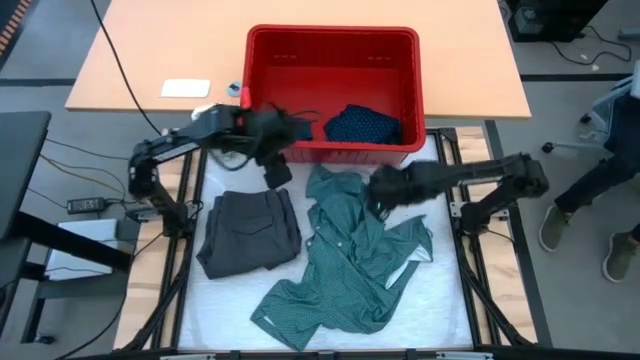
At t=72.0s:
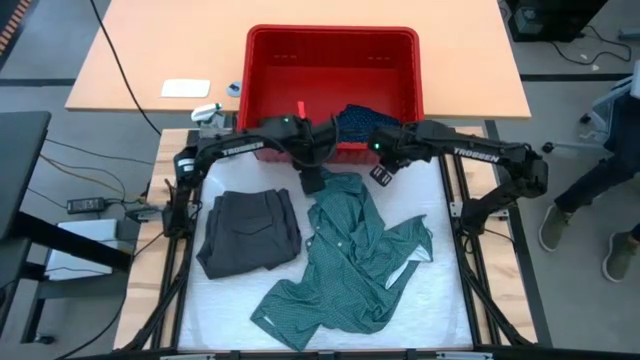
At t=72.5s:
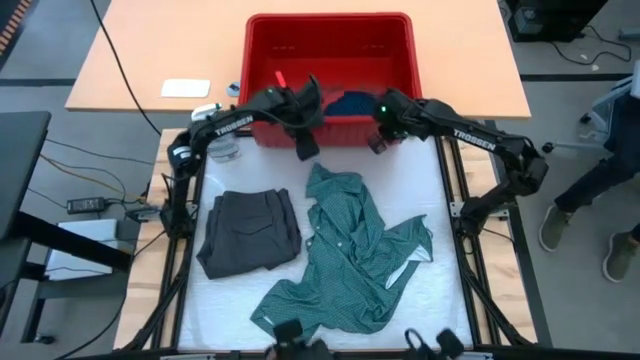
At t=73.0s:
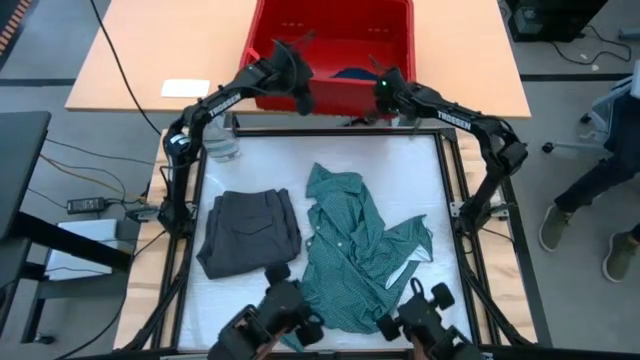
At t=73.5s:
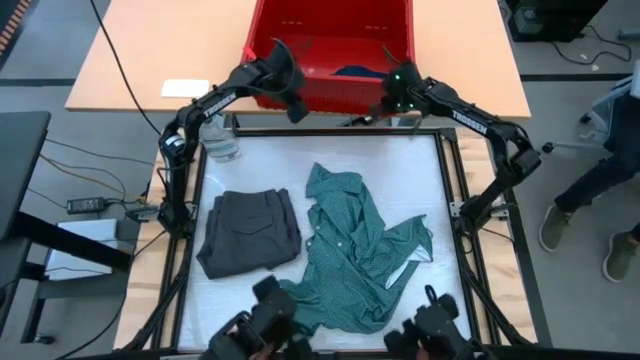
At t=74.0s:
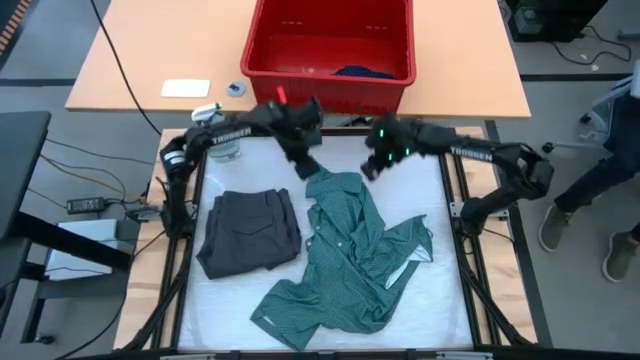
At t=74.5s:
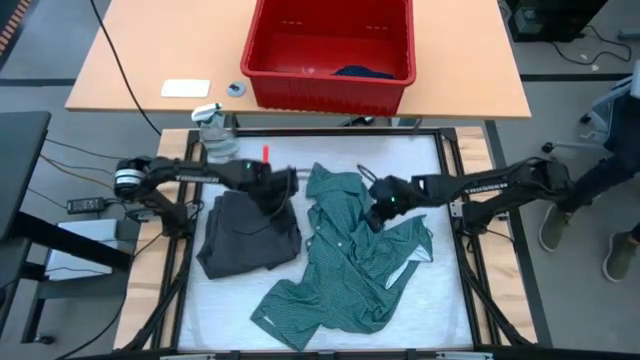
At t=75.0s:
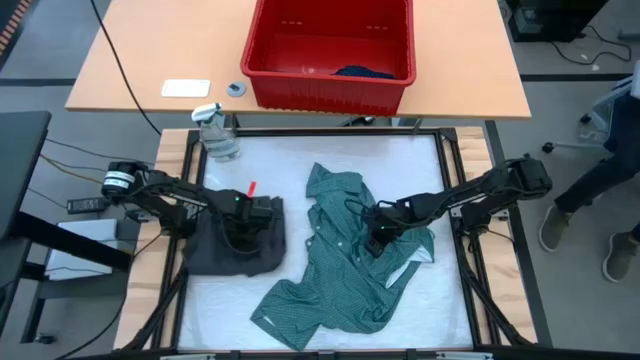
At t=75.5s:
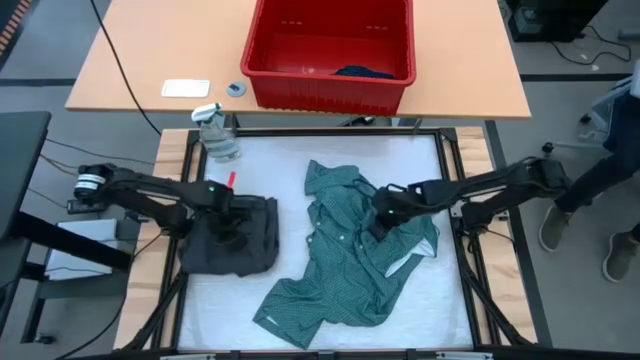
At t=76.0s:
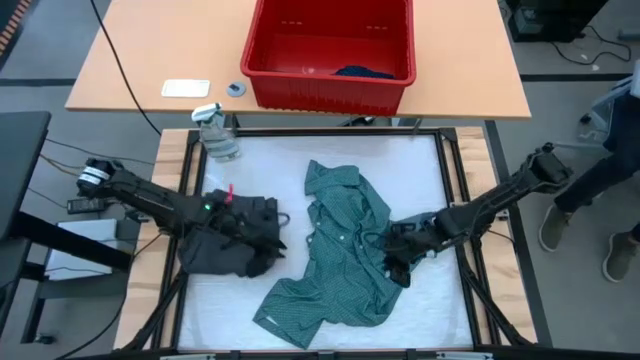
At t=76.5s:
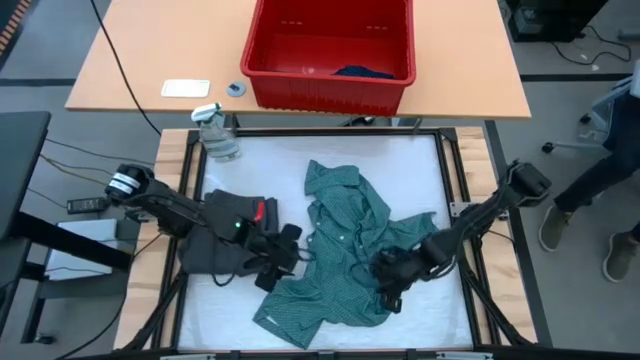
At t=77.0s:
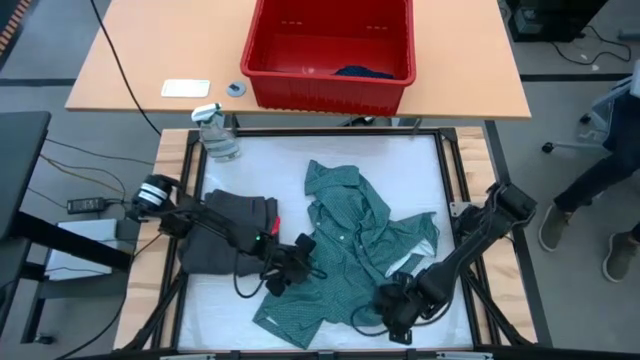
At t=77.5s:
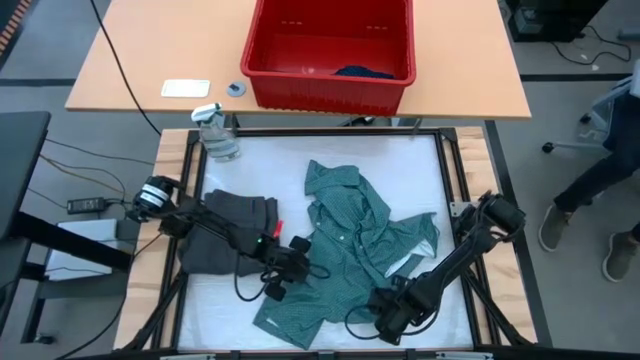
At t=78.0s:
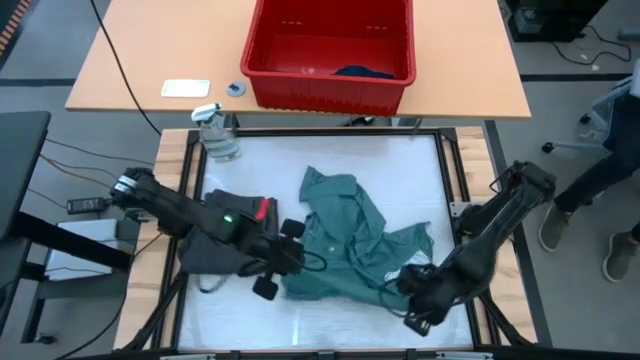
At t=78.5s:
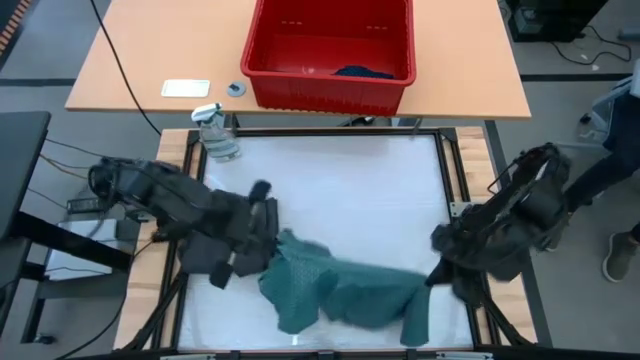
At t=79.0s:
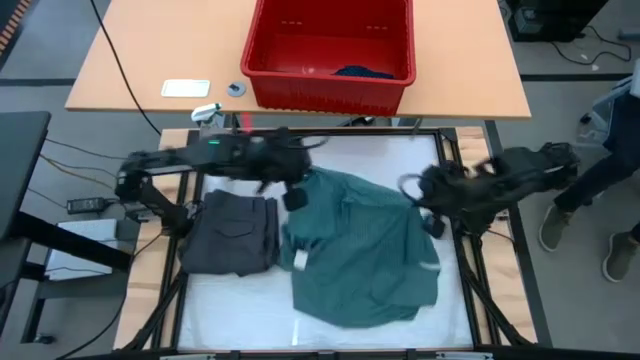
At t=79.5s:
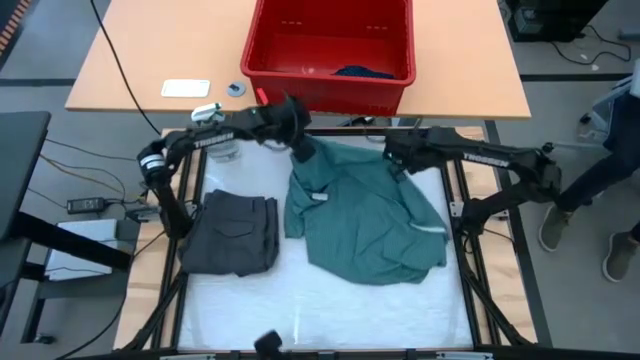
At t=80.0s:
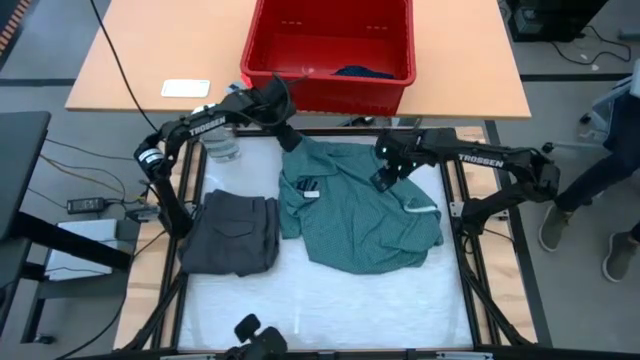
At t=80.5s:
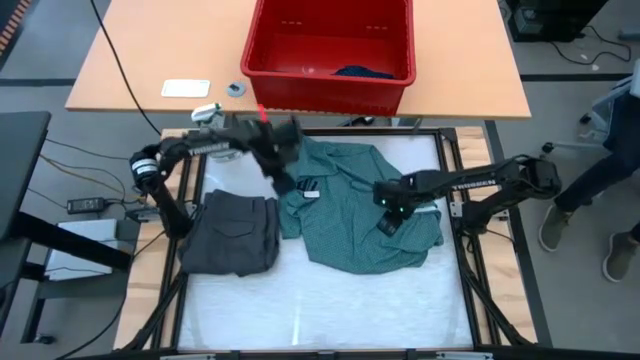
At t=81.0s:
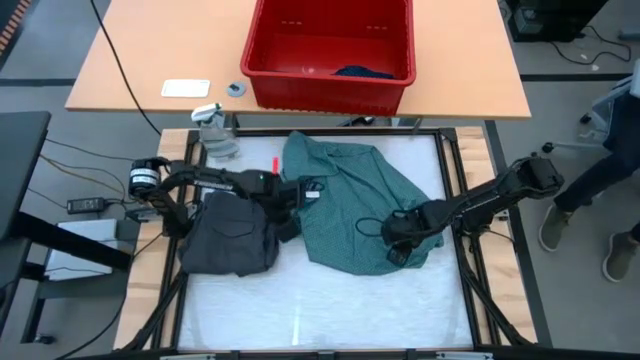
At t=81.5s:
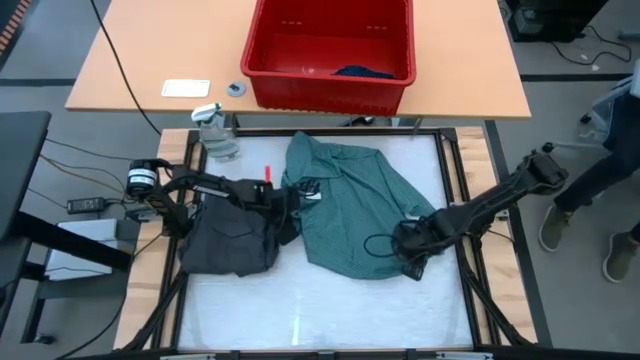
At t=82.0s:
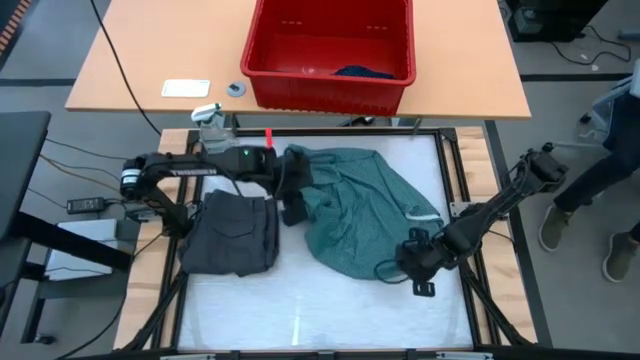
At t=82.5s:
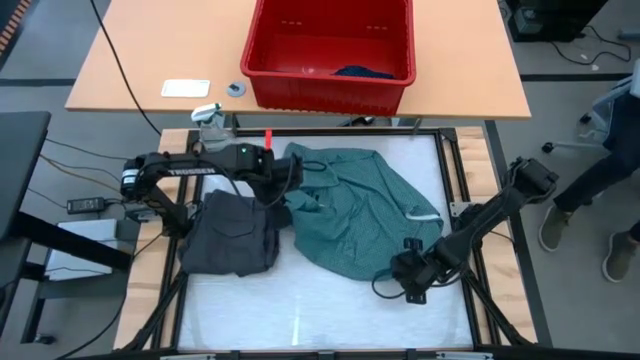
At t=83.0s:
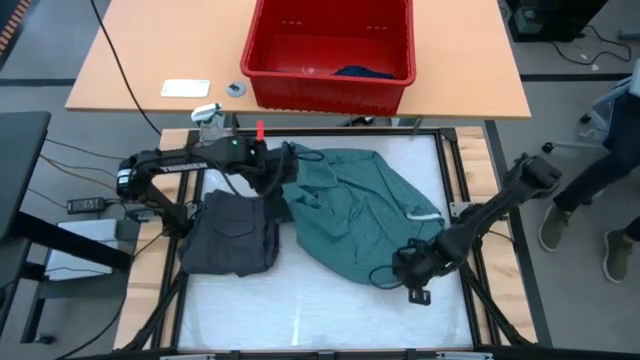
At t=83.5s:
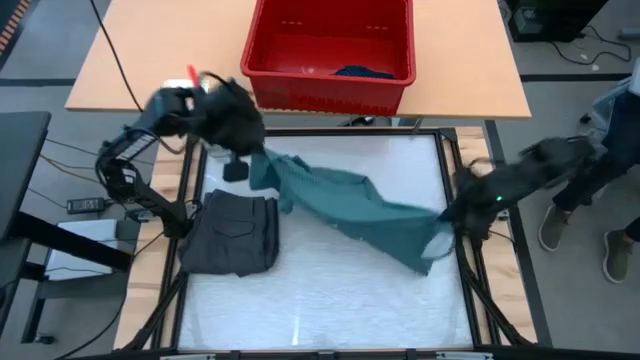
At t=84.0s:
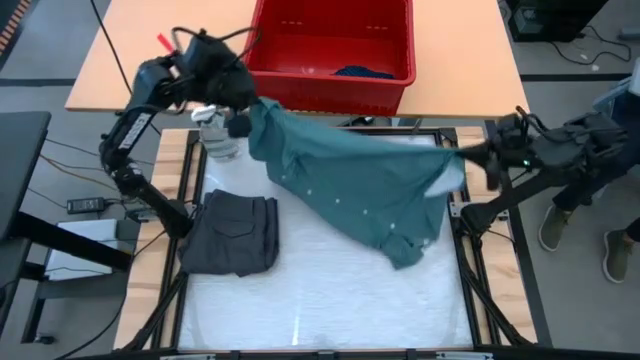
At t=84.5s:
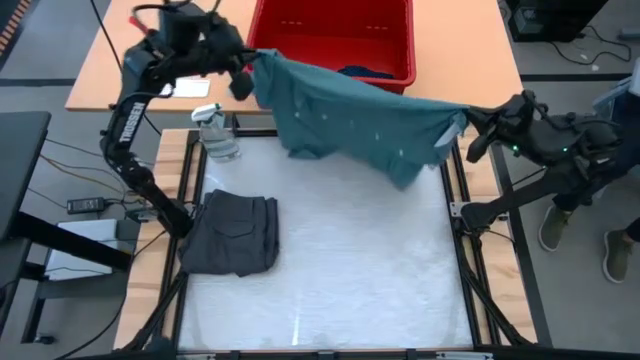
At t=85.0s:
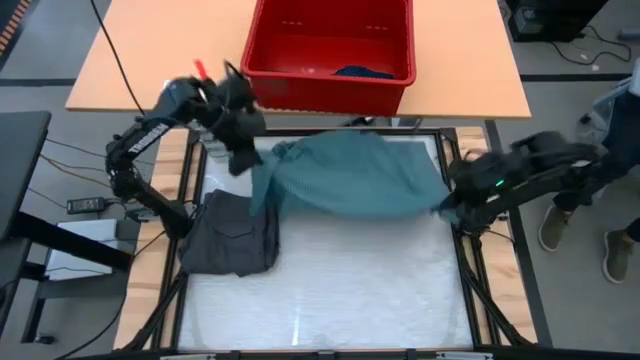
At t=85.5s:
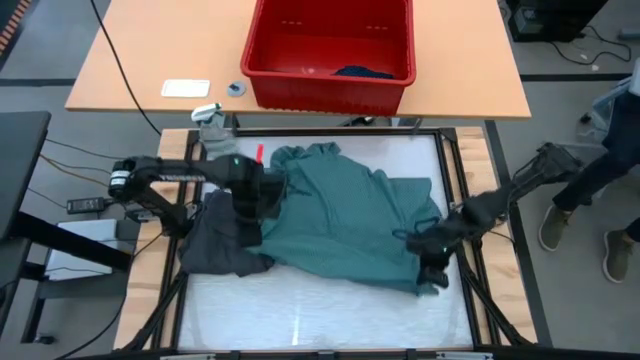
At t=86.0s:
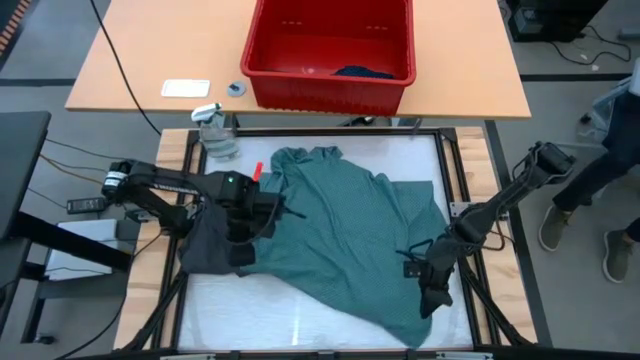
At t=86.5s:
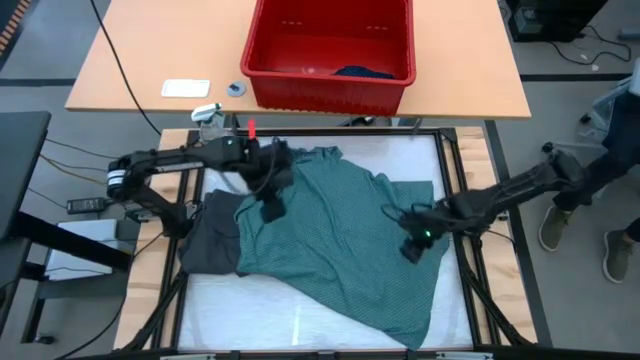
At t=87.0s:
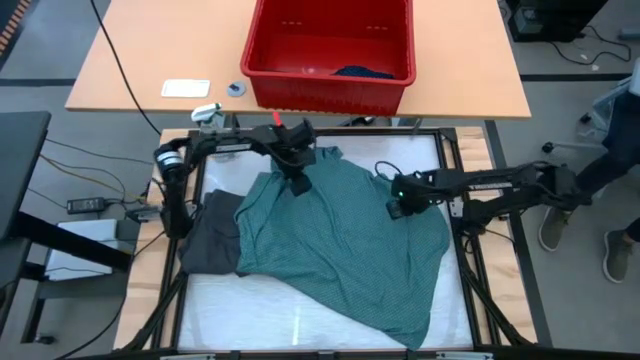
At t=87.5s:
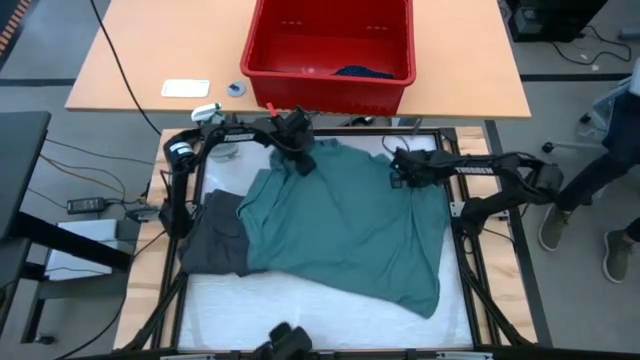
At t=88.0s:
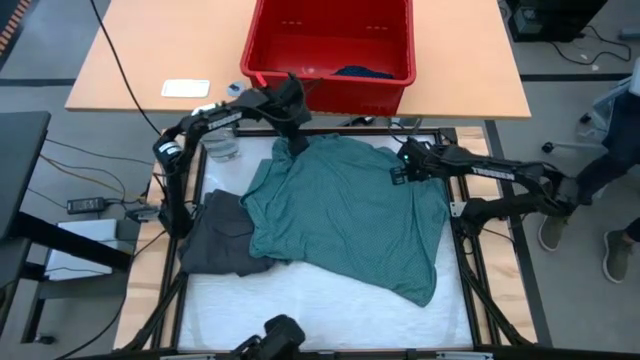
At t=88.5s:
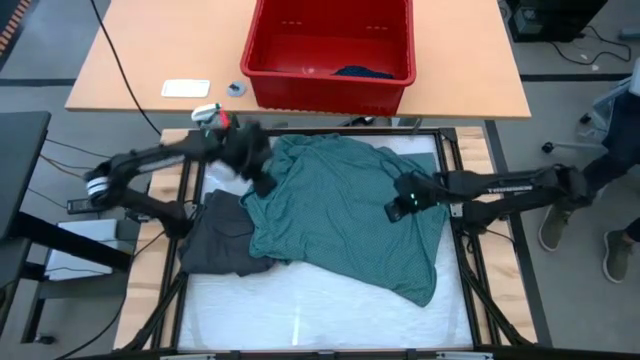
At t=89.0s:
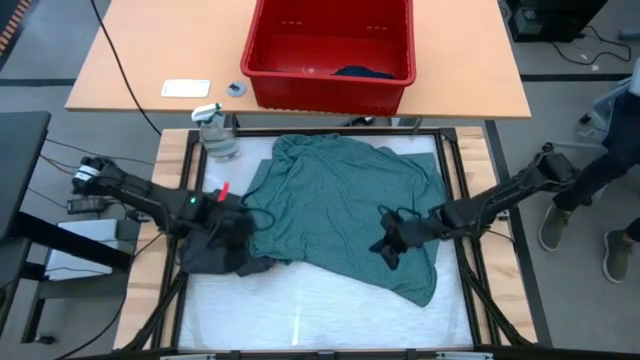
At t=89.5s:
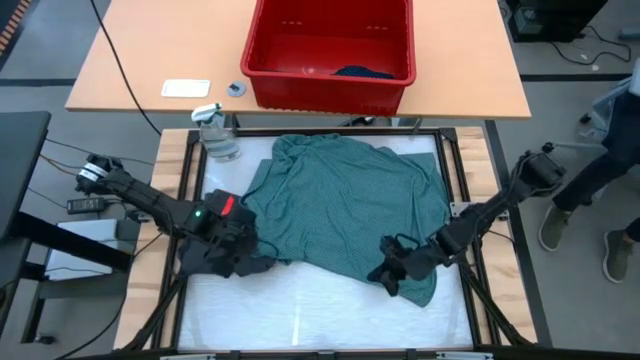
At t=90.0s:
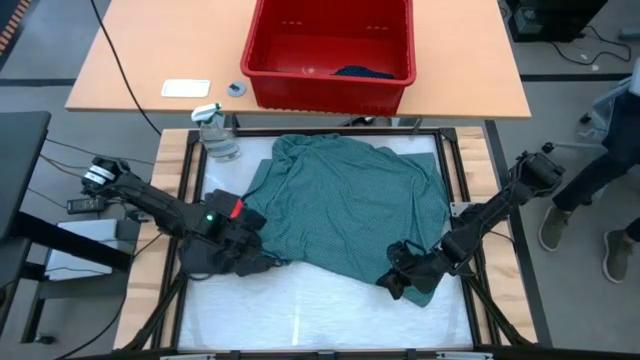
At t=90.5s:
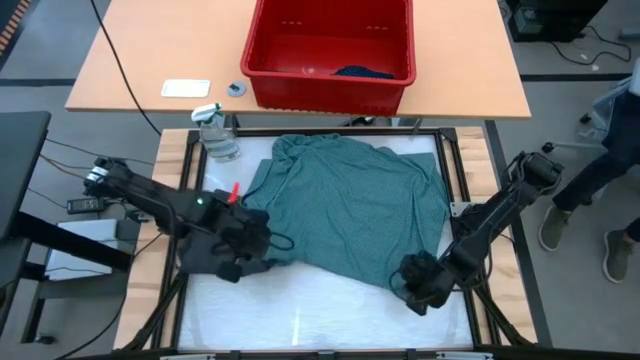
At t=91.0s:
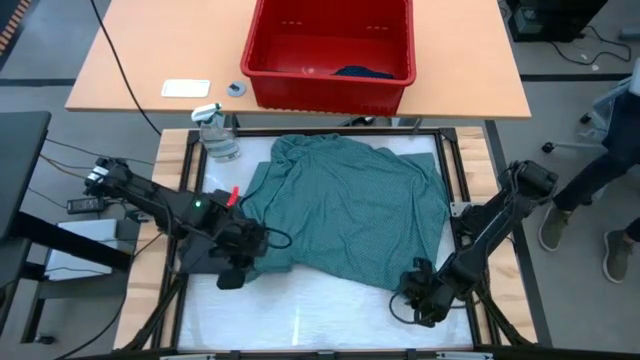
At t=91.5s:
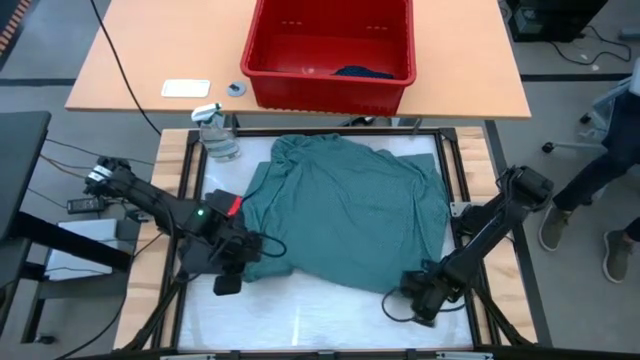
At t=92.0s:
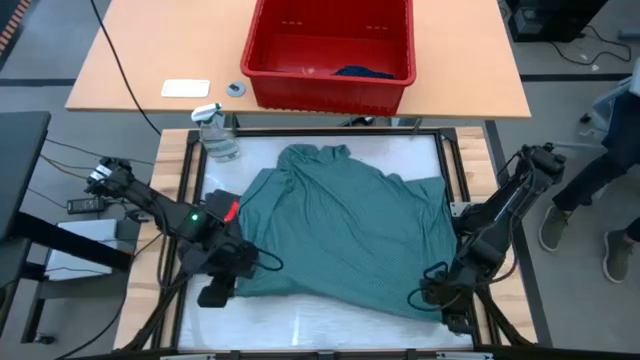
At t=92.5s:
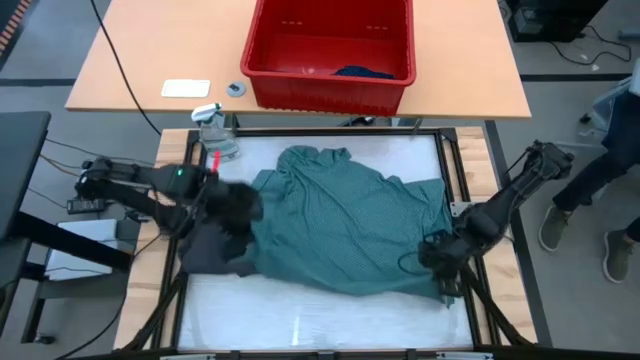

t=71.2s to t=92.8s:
Task: Fold Laundry from Bin
Fold the green polo shirt on the table
